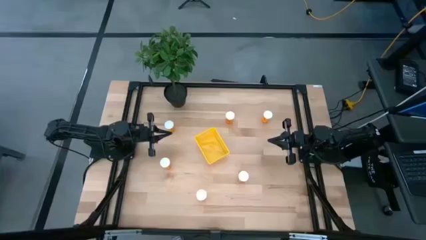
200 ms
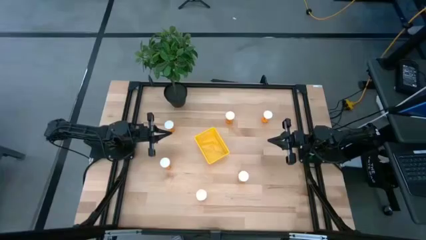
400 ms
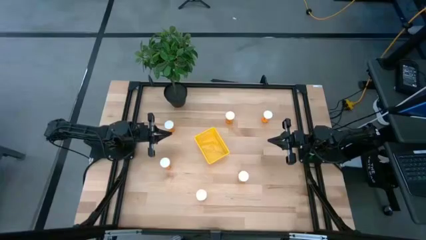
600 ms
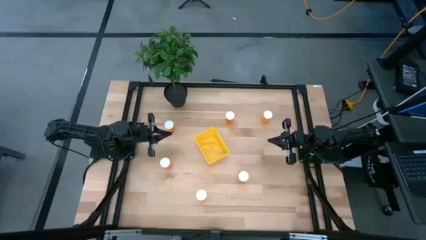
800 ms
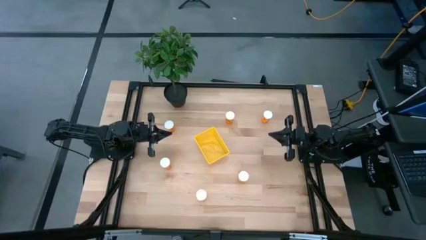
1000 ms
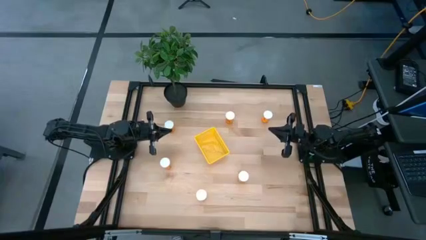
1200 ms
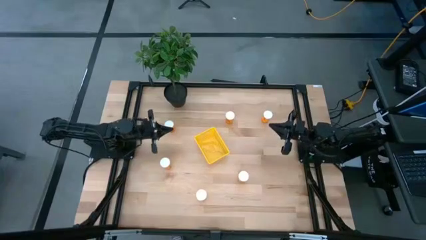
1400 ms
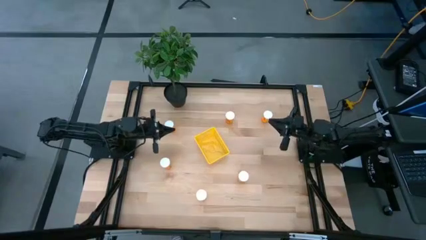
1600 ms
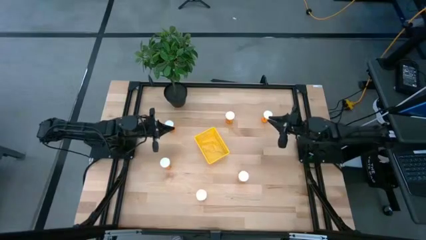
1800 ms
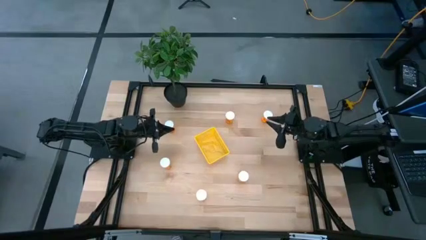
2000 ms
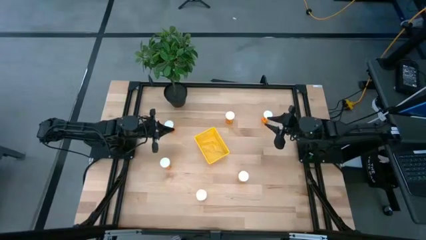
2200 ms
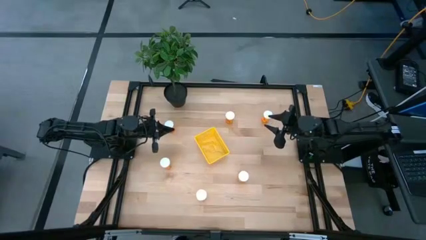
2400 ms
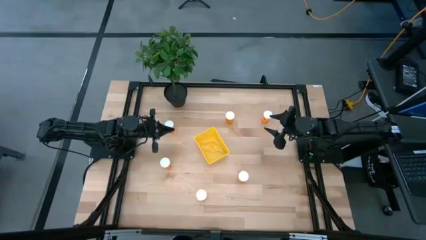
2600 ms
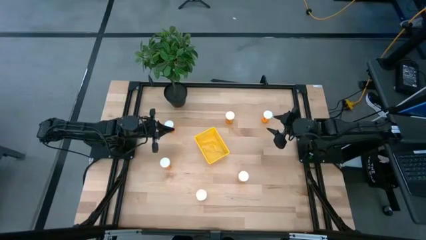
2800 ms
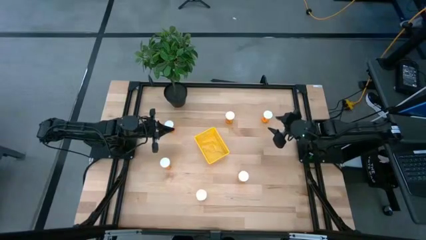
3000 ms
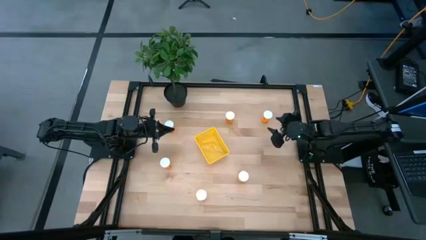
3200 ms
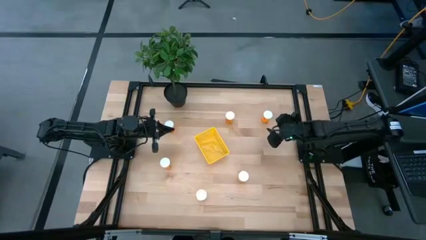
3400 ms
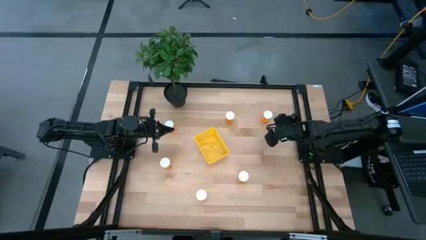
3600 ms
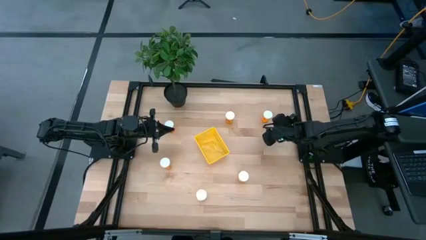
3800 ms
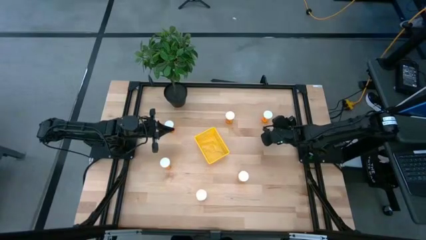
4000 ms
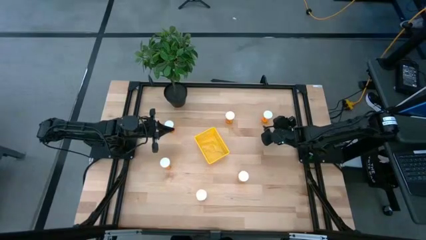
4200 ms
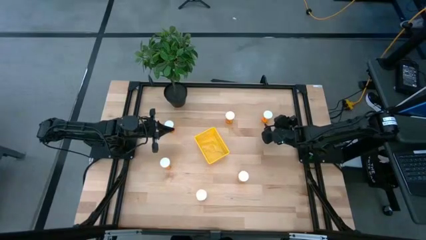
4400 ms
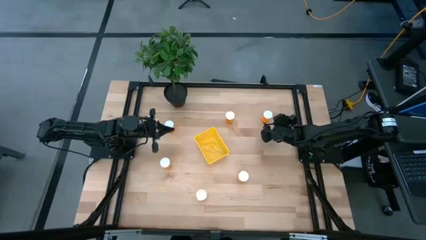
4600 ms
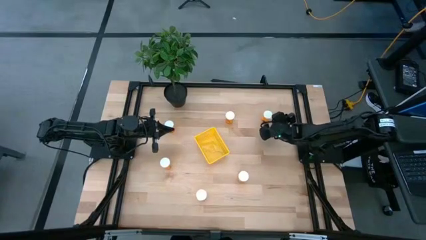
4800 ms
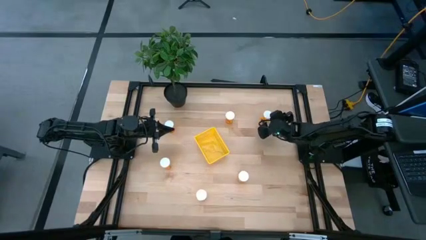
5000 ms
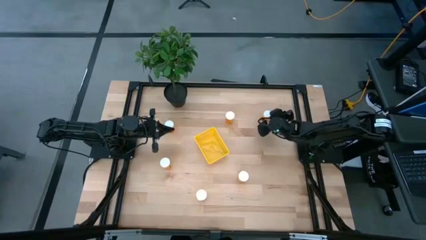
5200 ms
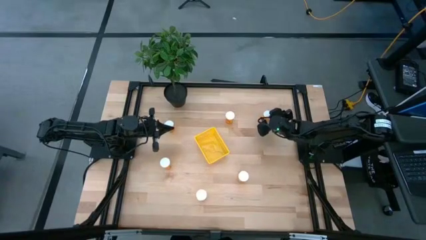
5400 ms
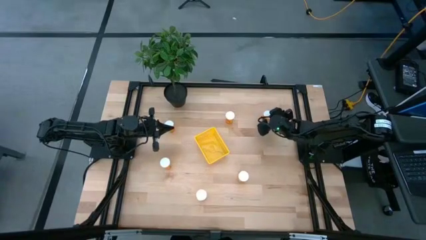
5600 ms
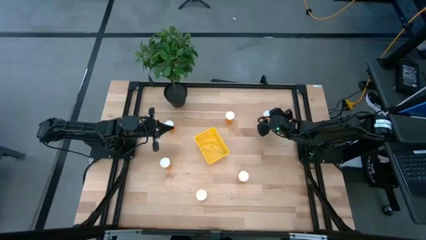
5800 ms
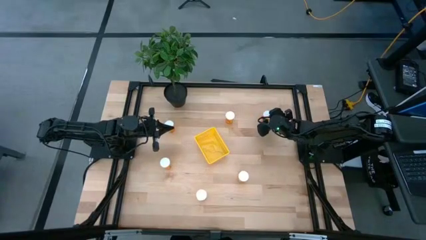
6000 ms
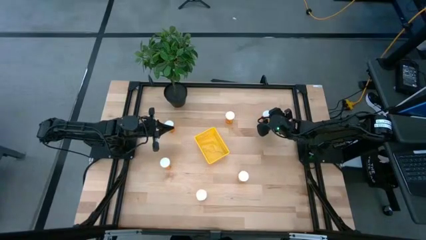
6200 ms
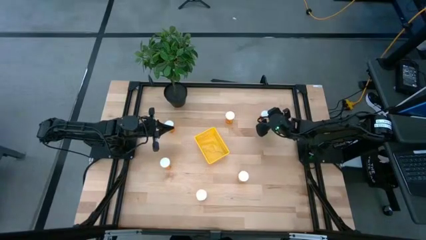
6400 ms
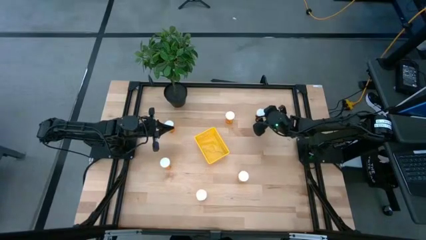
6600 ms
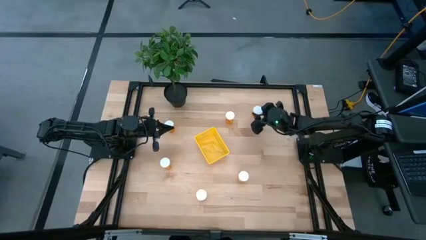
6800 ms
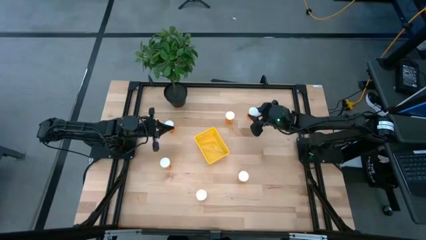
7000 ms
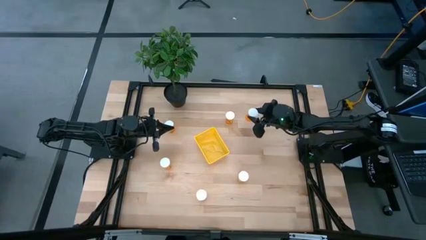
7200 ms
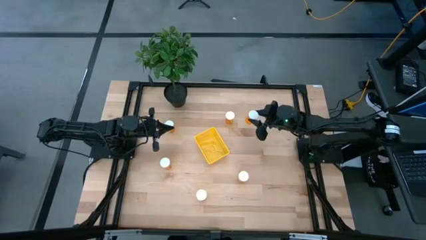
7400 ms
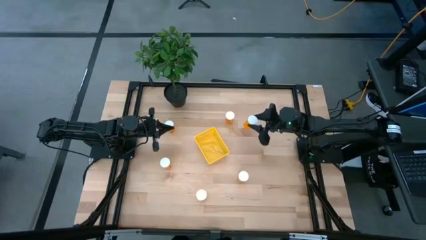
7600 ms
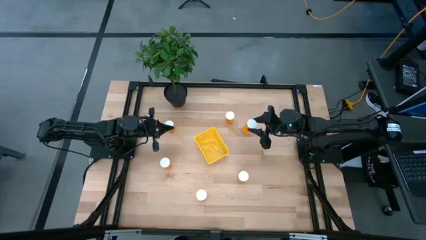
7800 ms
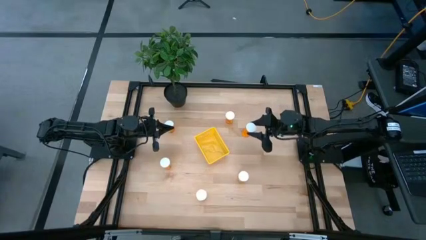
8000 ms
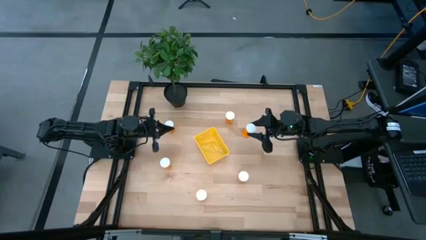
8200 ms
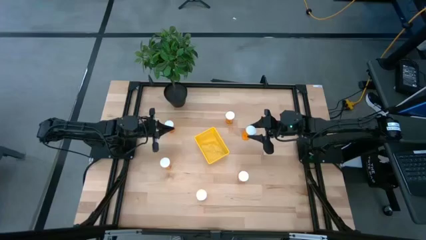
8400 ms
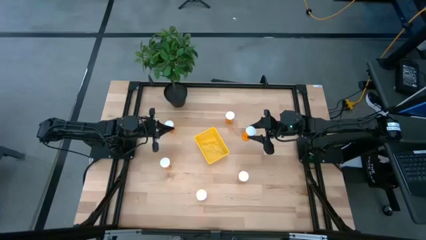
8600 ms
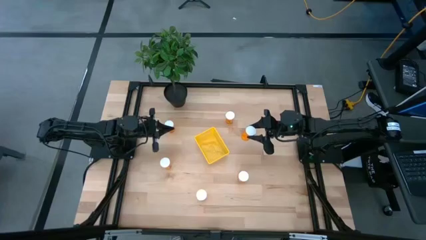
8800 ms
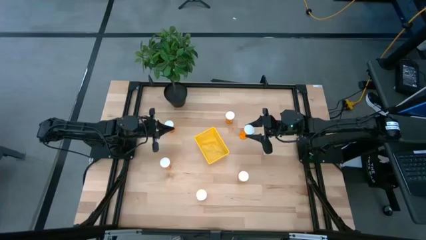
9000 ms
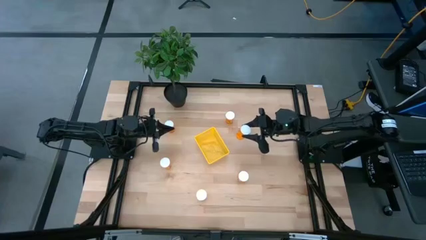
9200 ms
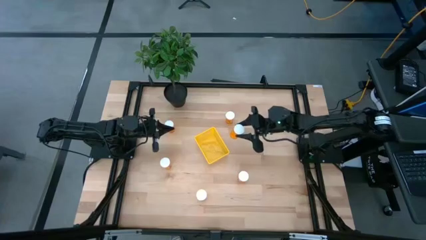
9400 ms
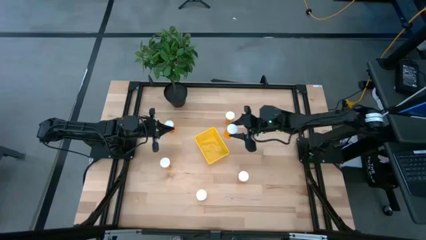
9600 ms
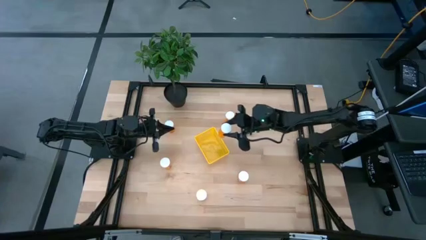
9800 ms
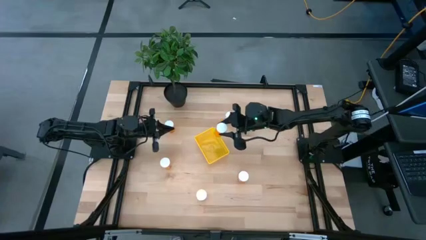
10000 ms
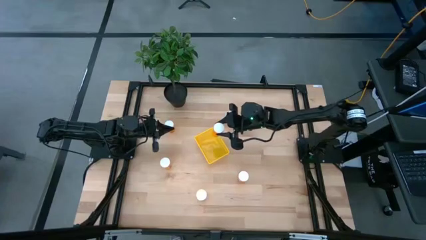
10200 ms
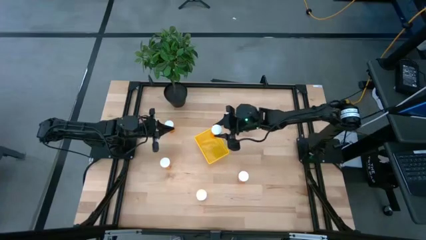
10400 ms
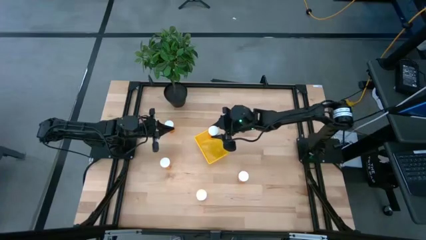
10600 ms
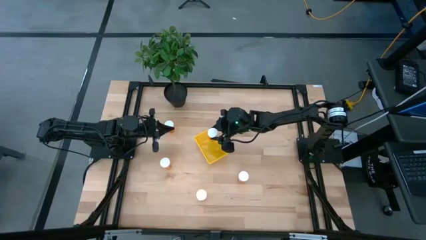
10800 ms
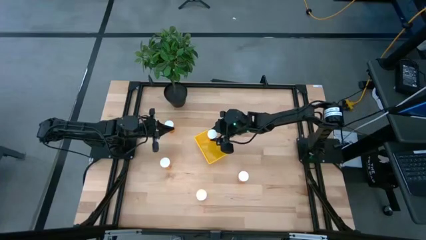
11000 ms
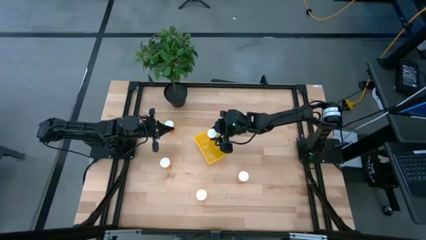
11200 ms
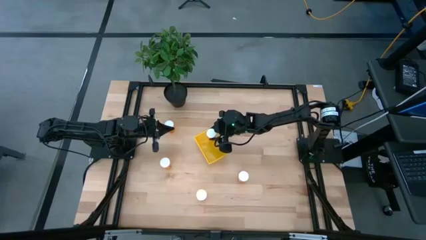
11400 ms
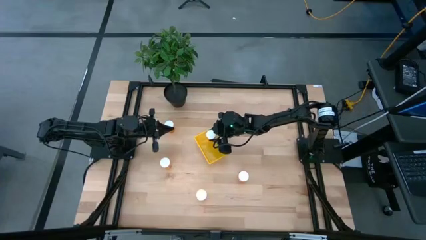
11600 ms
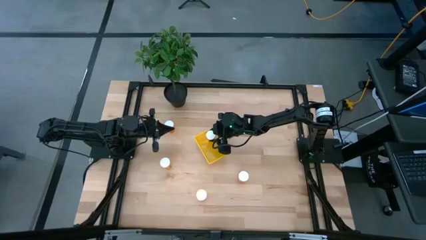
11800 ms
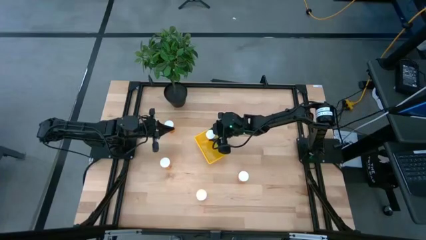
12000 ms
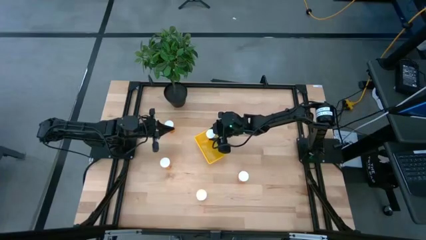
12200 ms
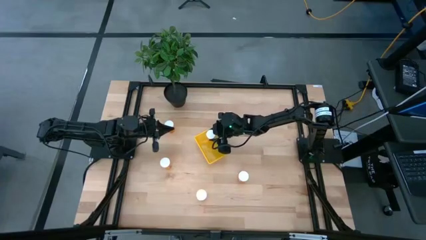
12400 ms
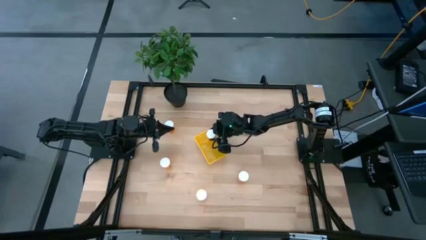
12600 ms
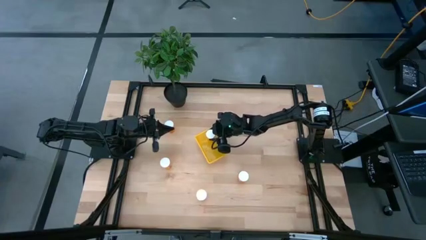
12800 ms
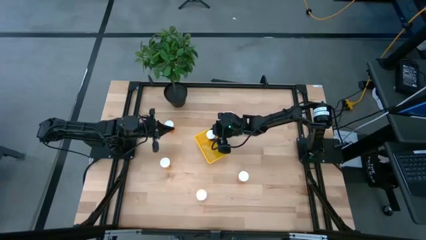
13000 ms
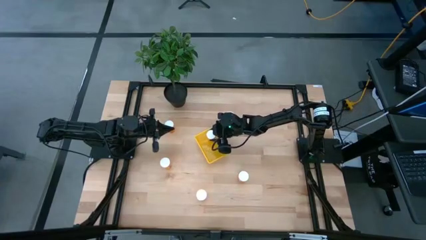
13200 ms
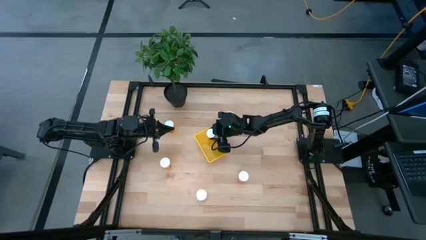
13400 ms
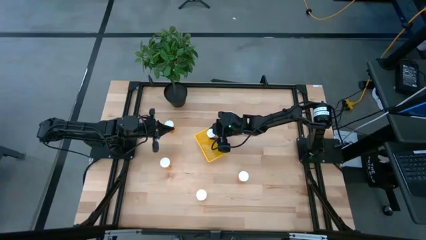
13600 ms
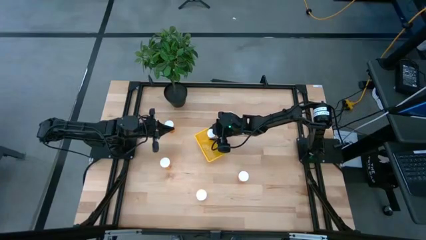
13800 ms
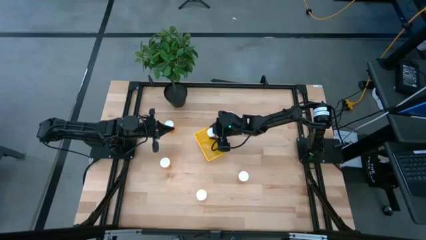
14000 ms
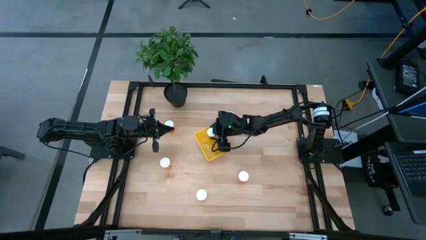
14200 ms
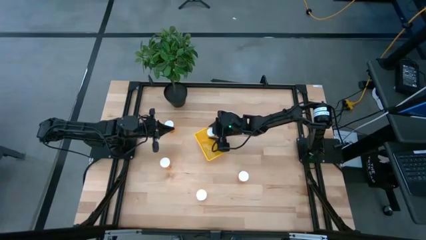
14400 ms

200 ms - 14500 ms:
Task: Pick and place pill bottles into a basket
Put the pill bottle into the bin

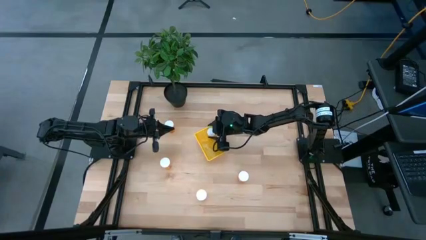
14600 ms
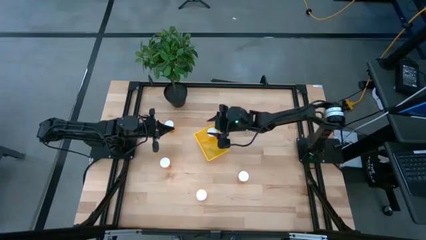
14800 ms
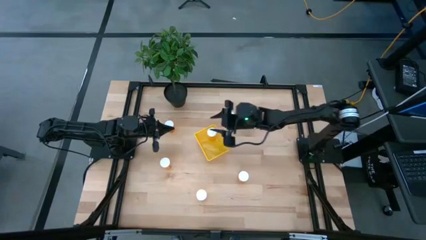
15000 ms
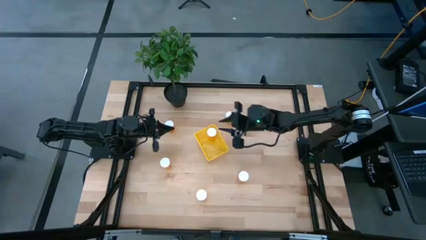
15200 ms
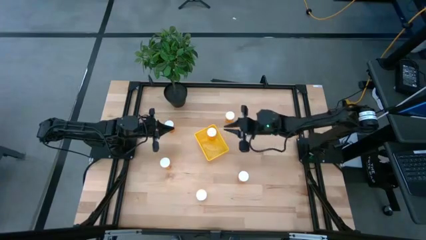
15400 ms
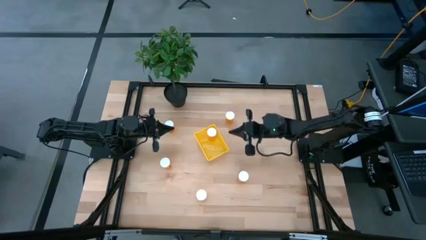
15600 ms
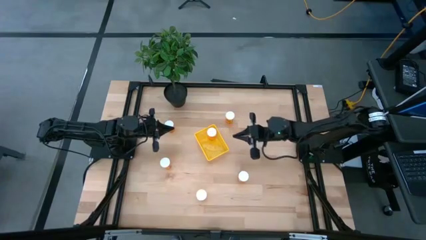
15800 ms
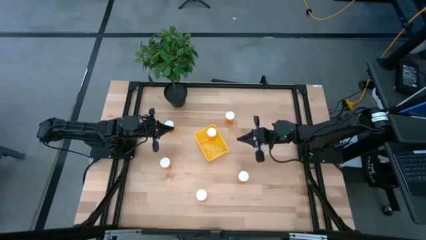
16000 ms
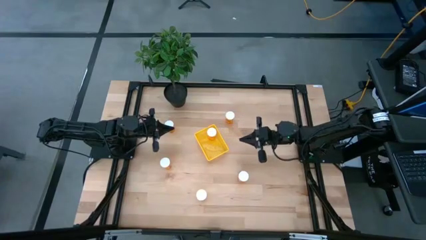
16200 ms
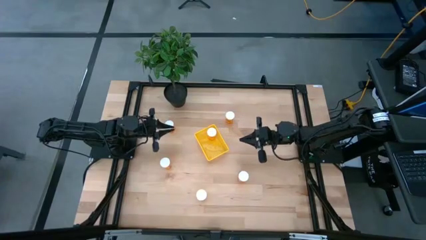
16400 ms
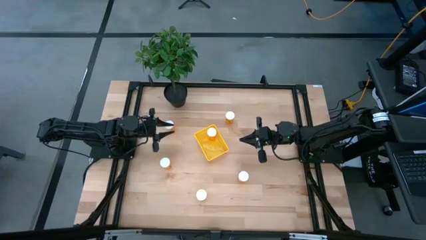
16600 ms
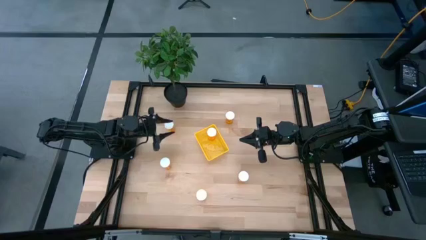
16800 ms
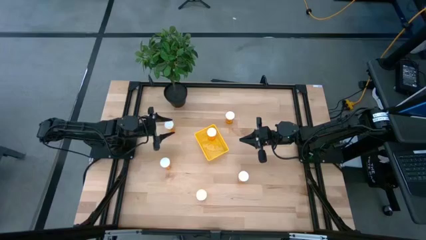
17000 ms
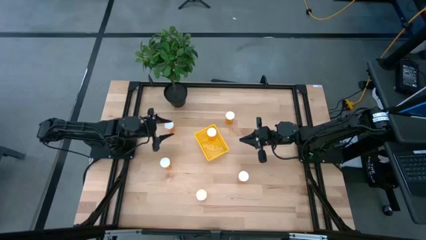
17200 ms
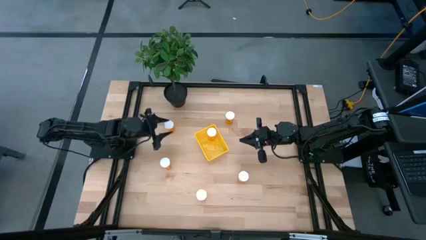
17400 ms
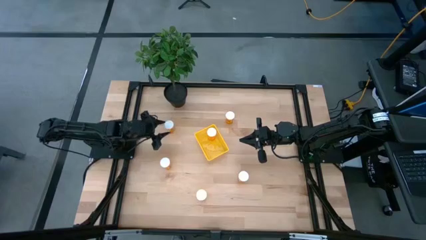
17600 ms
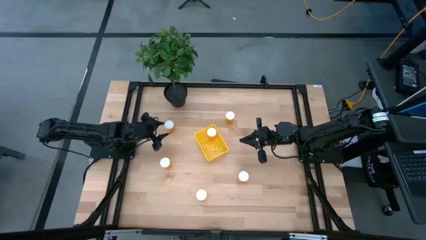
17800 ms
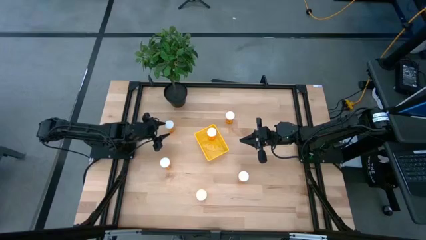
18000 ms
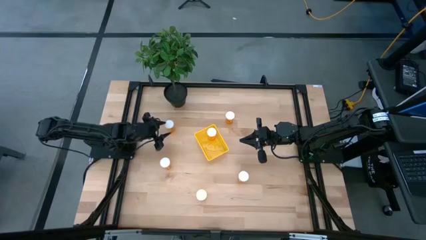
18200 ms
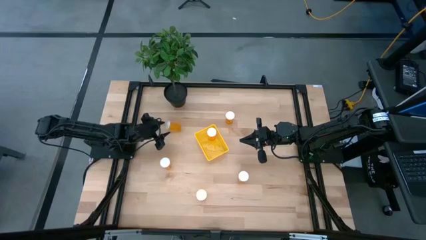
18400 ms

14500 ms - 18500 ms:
Put the pill bottle into the bin
